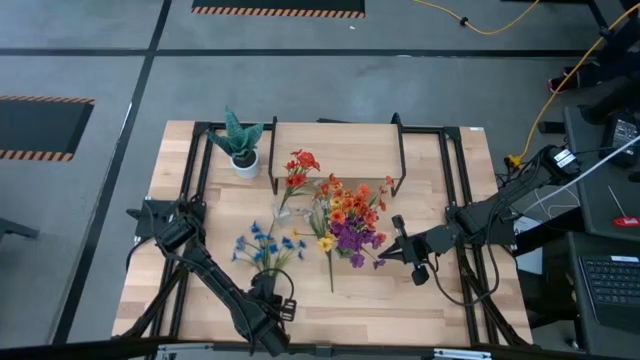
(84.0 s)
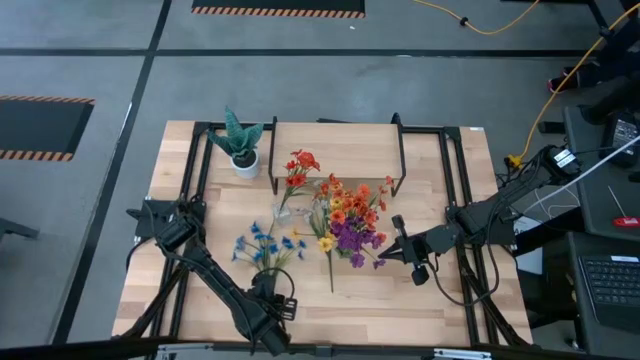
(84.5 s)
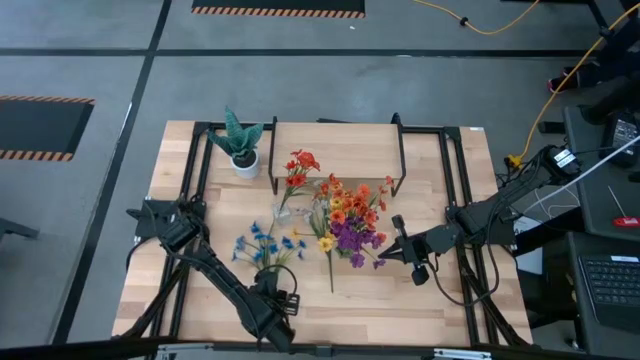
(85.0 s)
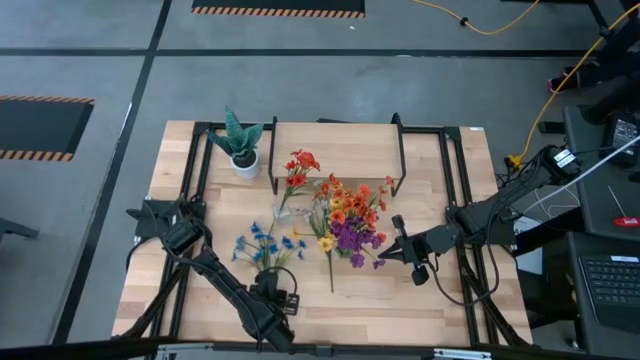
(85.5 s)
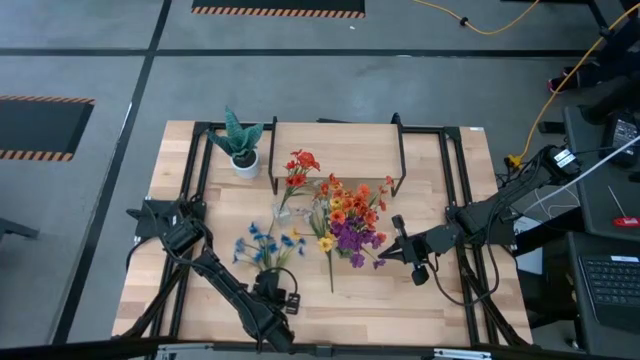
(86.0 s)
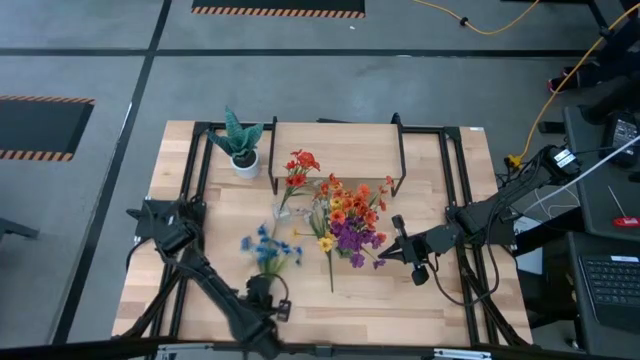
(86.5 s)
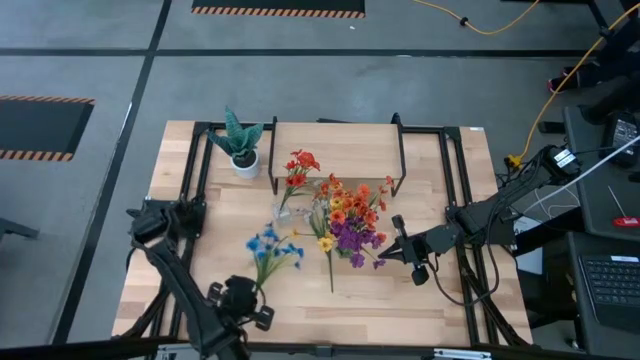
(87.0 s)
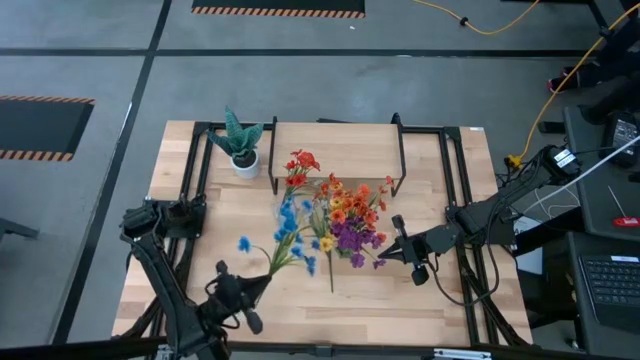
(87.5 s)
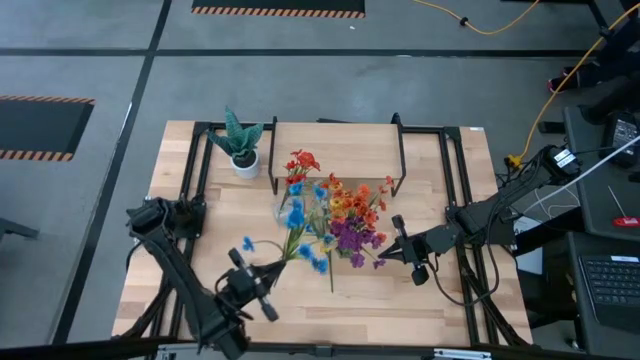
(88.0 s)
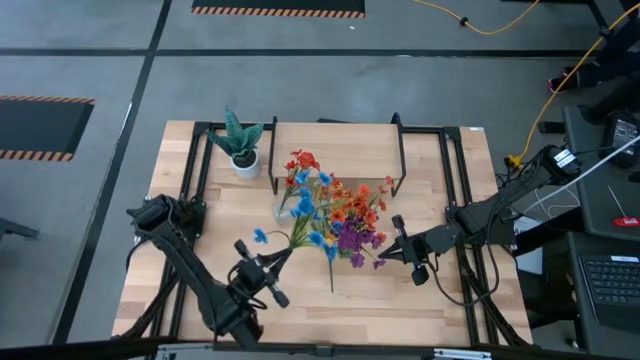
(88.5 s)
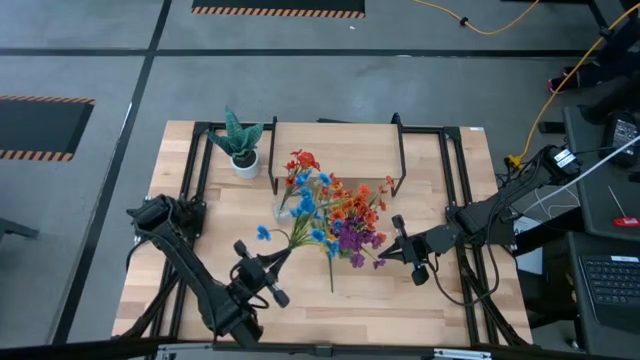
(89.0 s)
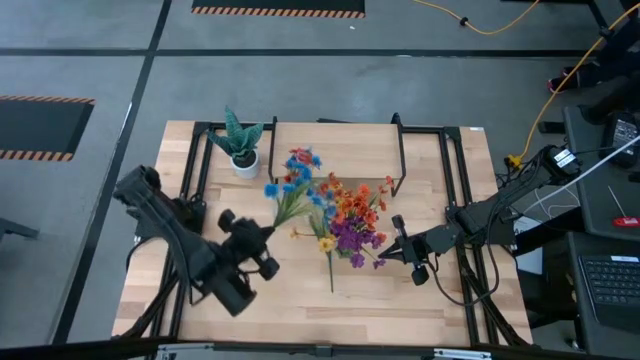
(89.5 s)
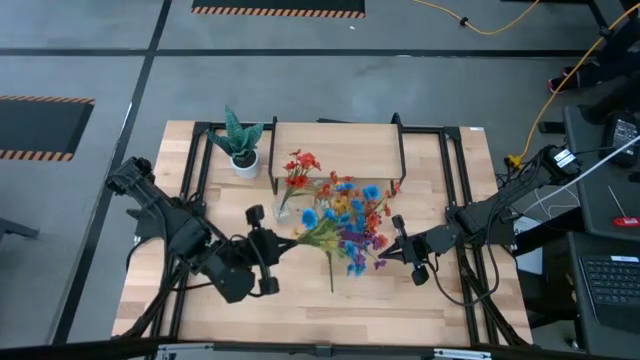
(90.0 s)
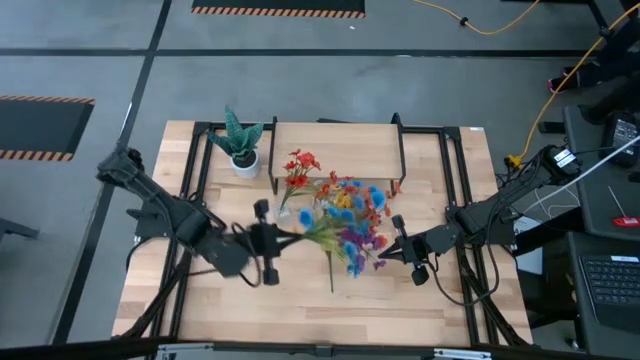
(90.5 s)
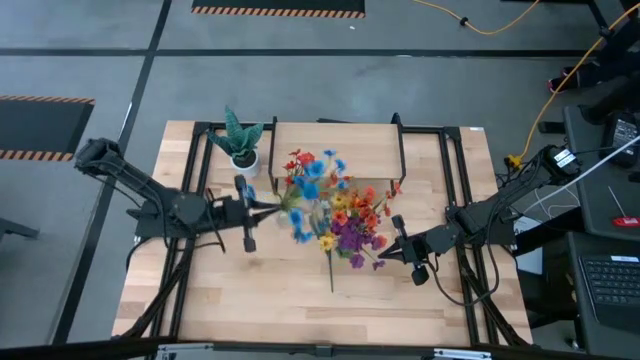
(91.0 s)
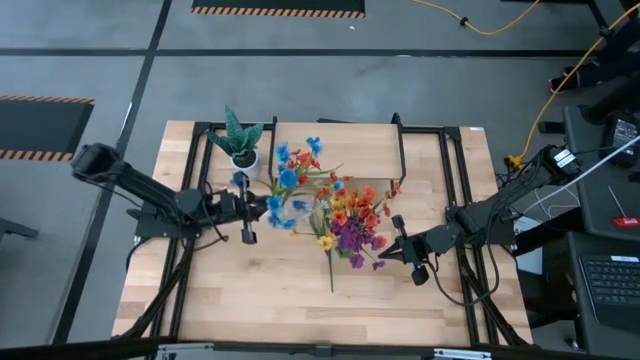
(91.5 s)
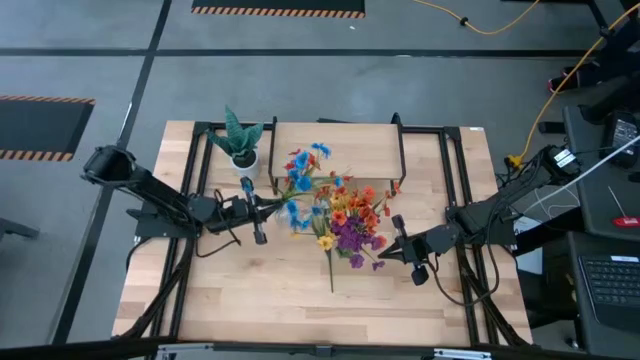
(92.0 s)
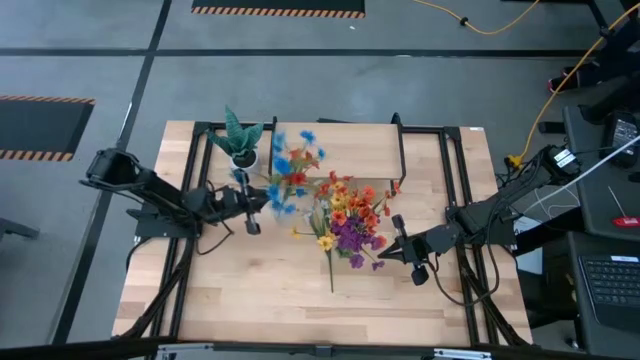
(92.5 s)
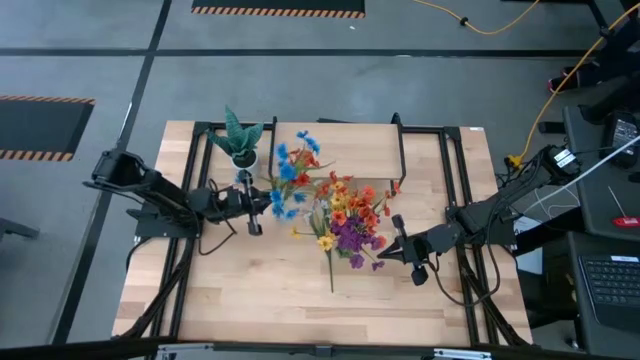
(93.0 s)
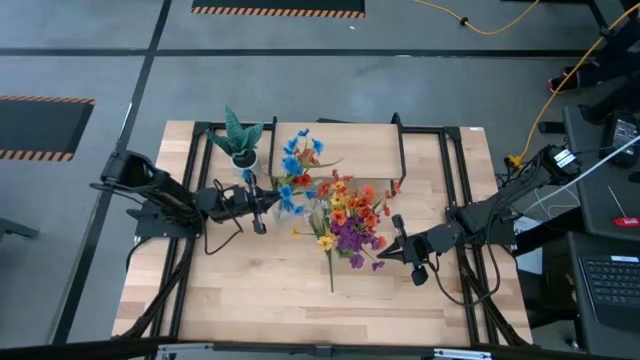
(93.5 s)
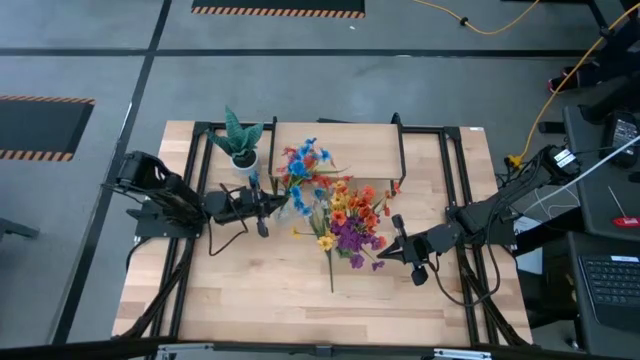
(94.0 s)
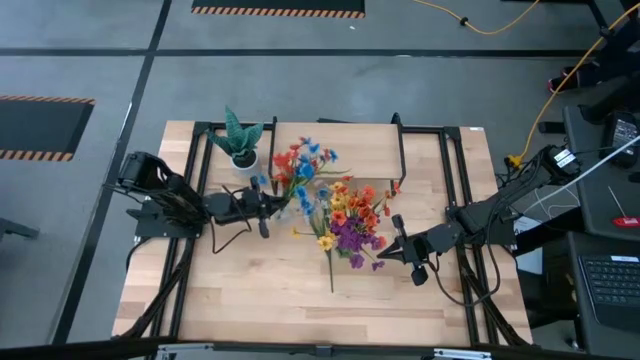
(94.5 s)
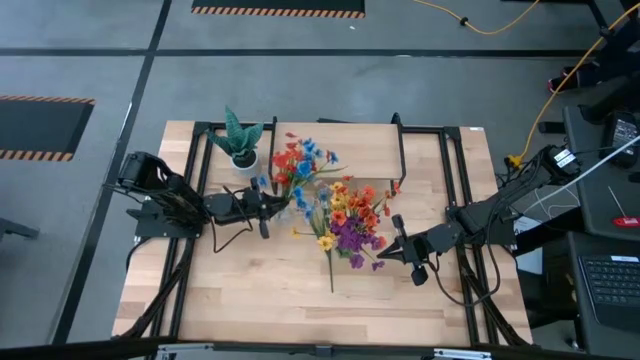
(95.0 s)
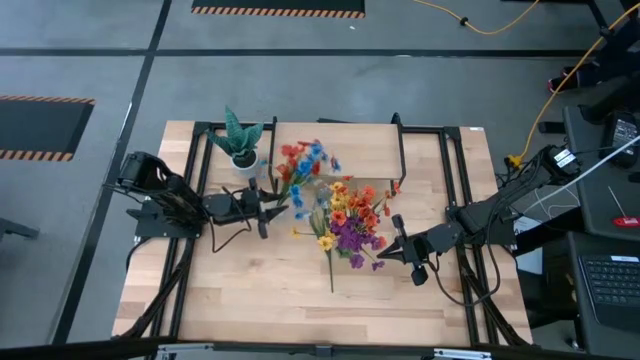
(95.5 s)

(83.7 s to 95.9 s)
Task: Pick and place flowers into a vace then onto a shelf
Put the blue flowers into the transparent vase

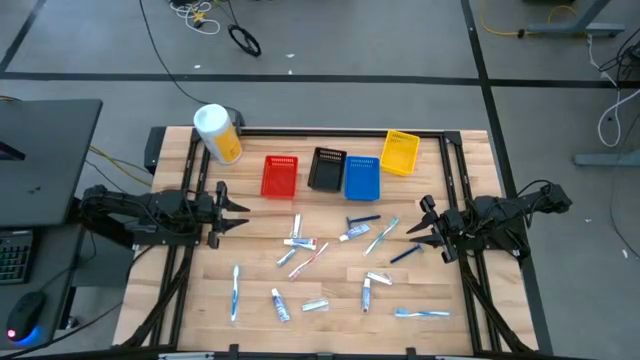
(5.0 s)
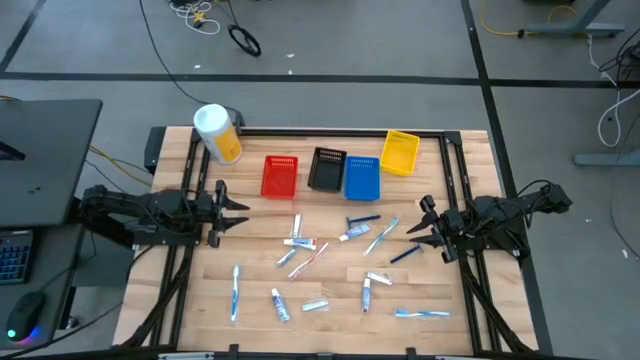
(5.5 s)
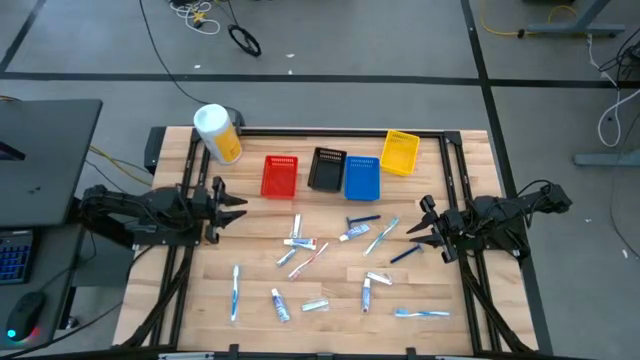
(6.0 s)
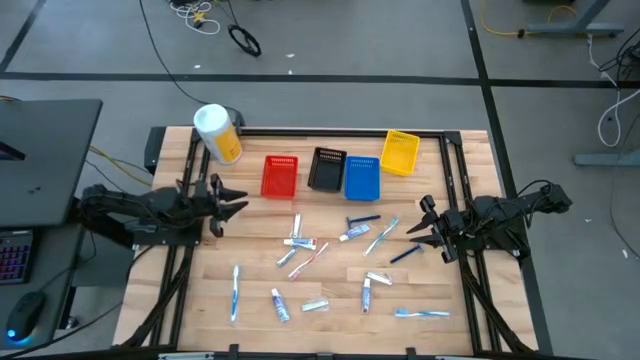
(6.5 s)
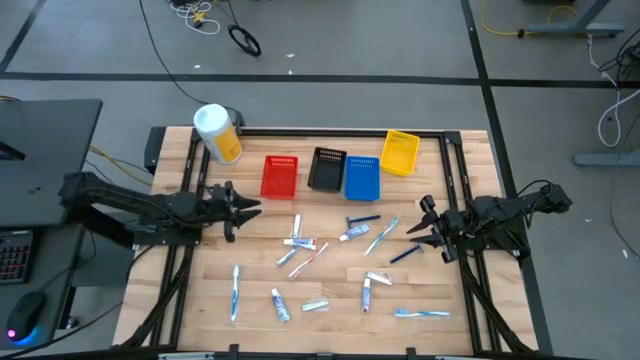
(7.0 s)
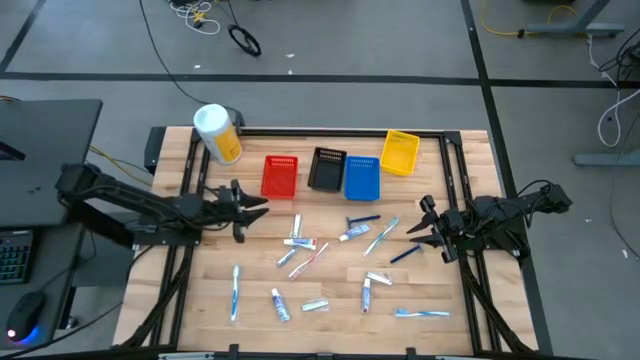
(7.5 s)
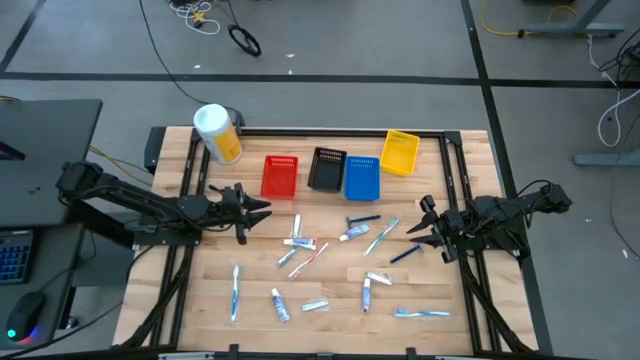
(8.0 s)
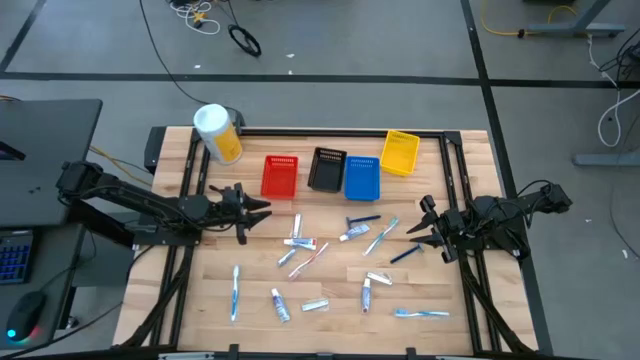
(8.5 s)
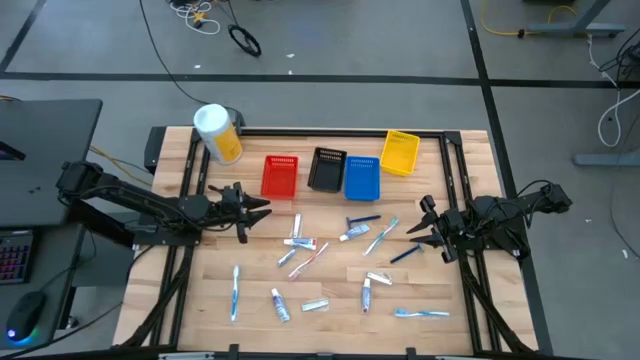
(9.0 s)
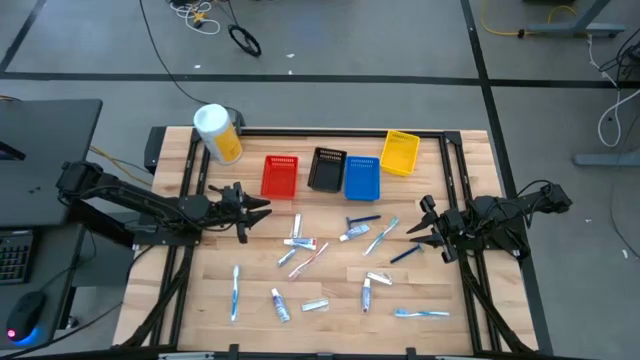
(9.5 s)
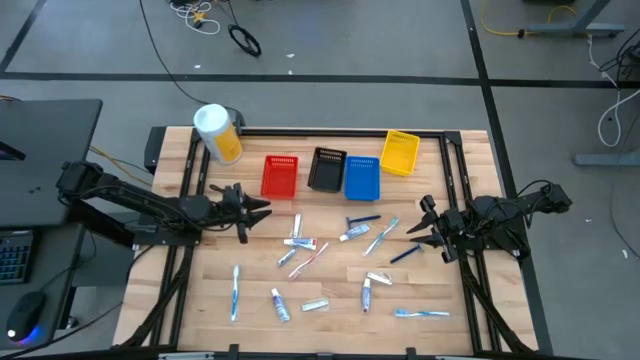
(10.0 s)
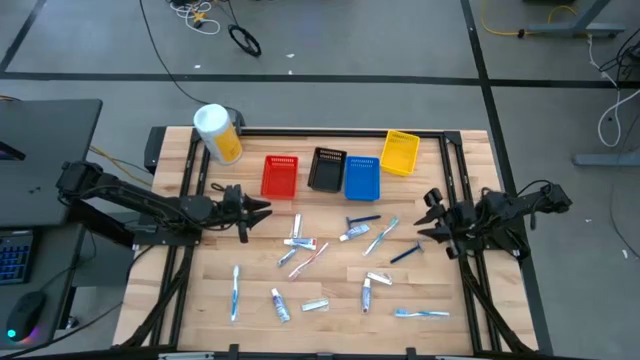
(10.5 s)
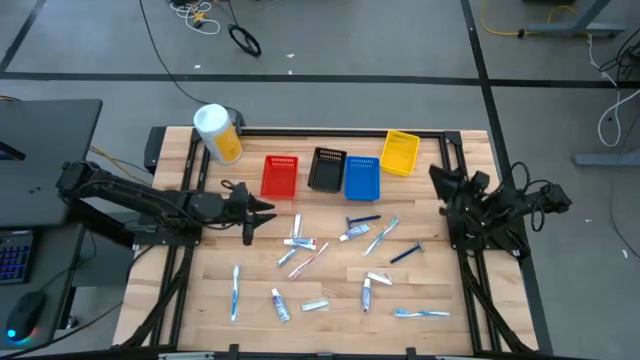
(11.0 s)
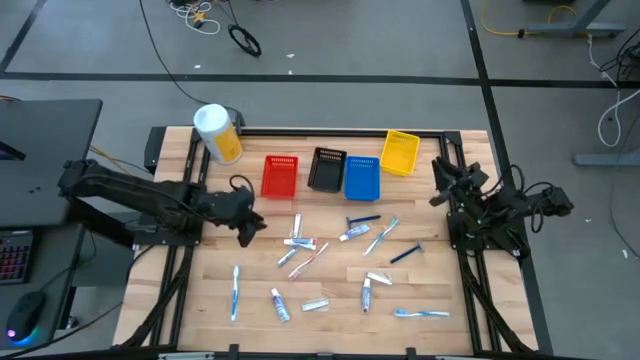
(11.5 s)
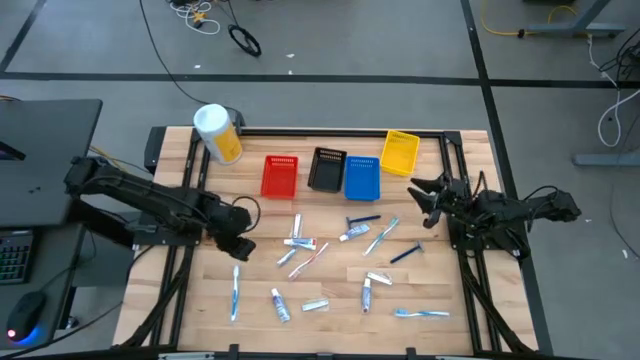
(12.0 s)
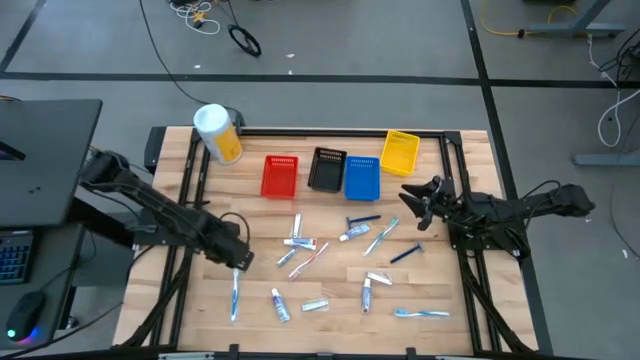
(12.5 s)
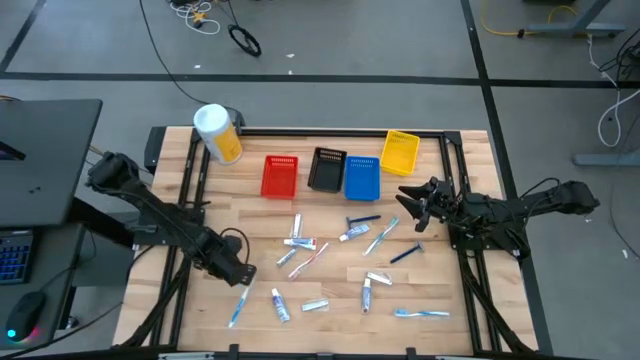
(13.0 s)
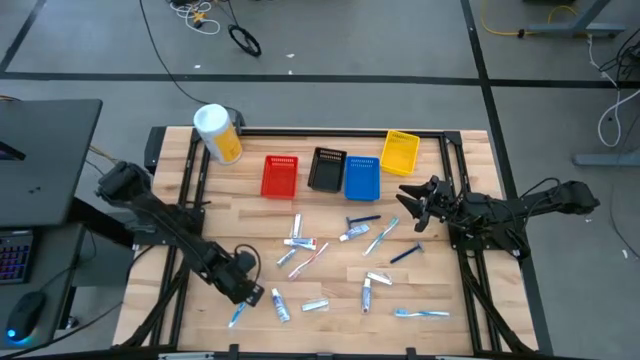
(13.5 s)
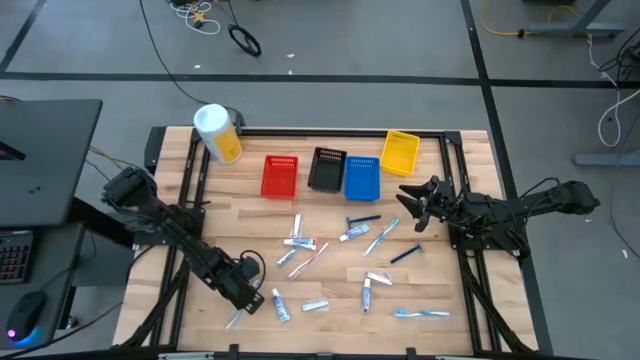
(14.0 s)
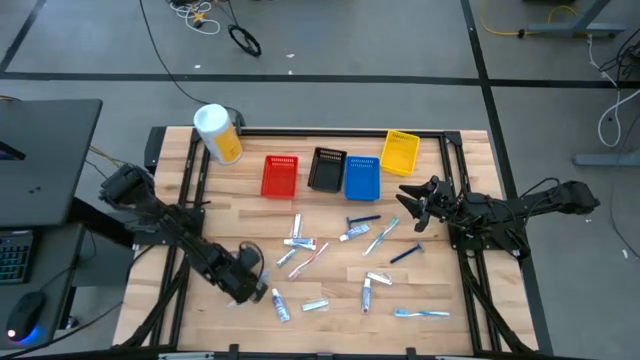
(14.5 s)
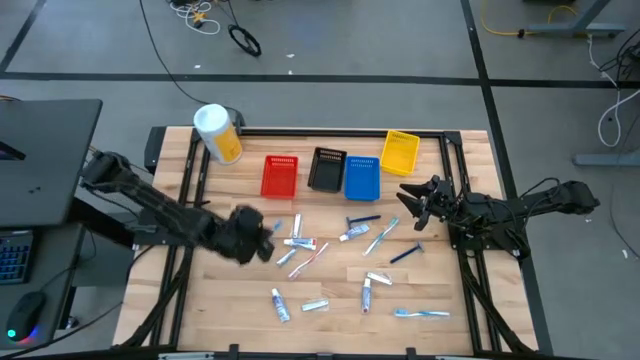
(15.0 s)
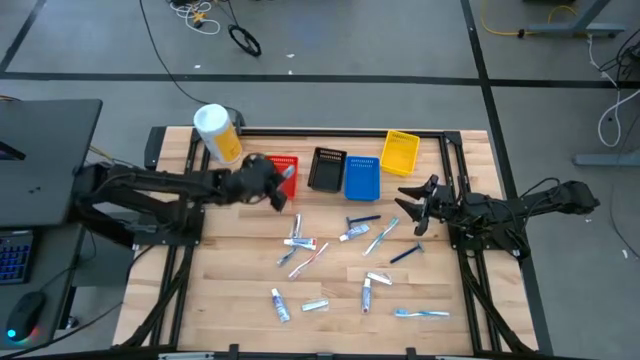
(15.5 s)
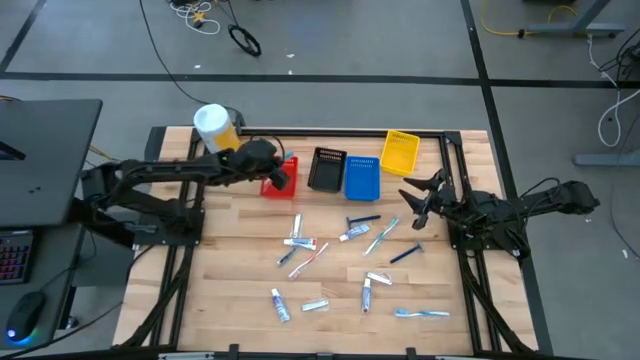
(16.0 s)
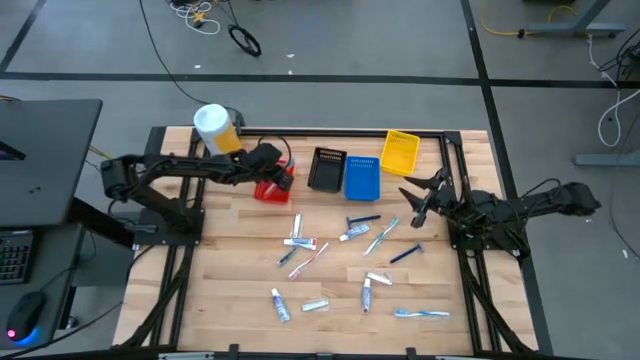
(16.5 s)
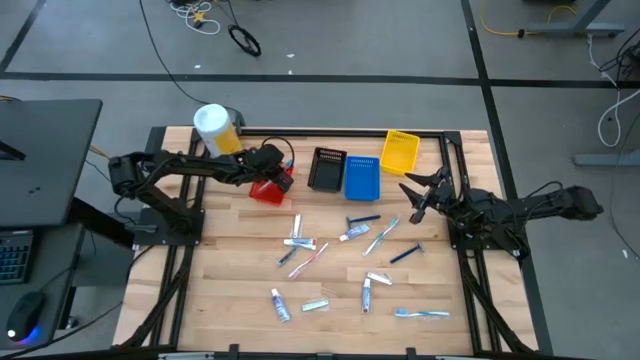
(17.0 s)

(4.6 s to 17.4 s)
Task: Pick & Place Travel size toiletries
Put the blue toothbrush into the red bin
